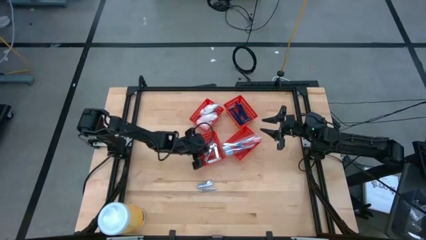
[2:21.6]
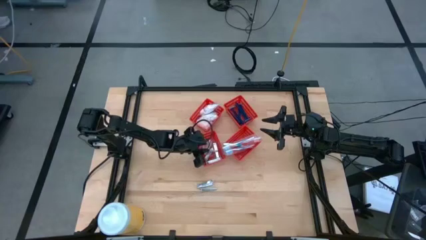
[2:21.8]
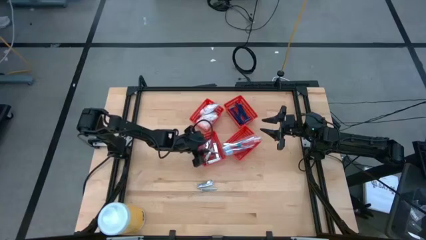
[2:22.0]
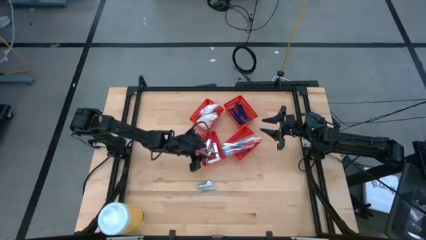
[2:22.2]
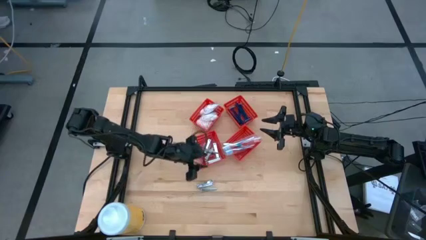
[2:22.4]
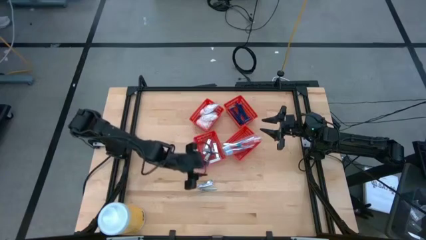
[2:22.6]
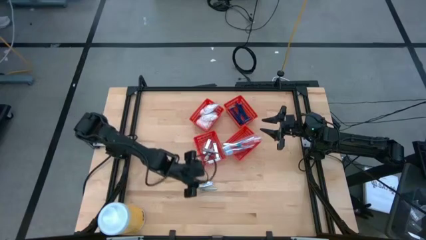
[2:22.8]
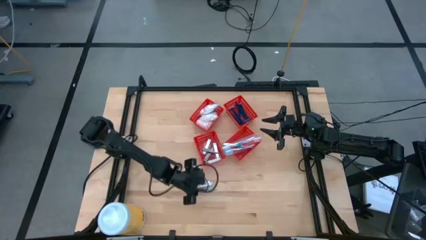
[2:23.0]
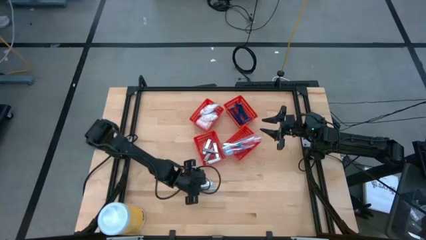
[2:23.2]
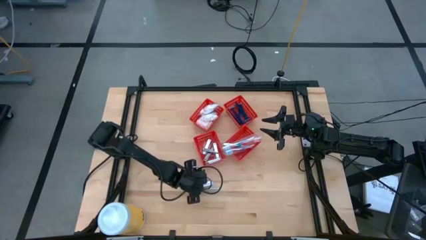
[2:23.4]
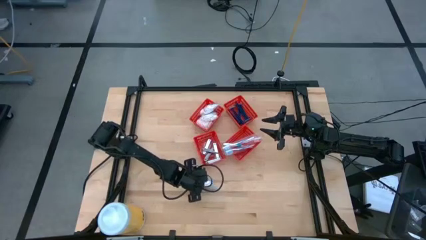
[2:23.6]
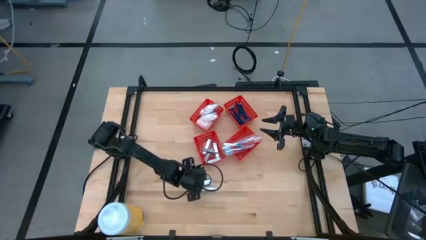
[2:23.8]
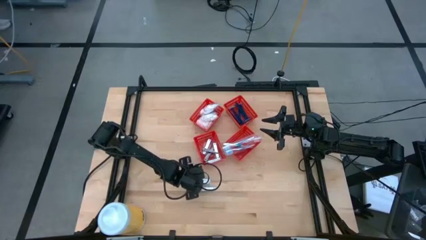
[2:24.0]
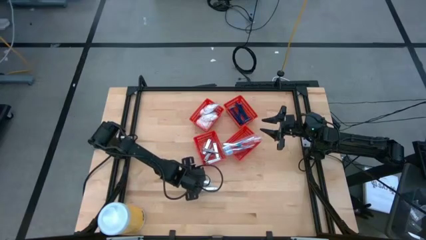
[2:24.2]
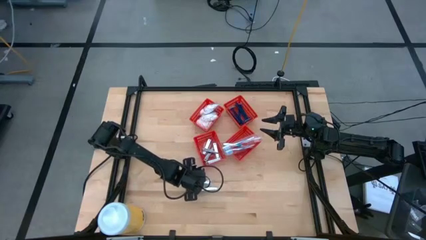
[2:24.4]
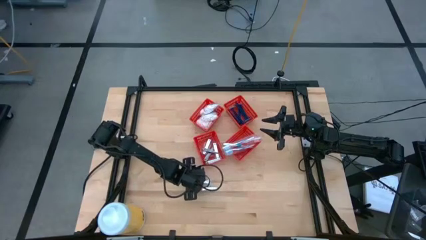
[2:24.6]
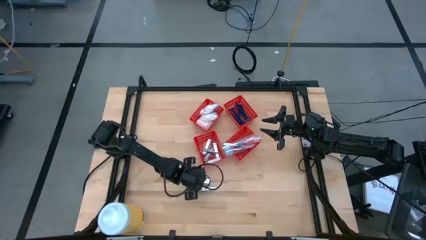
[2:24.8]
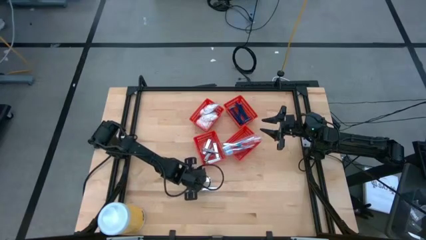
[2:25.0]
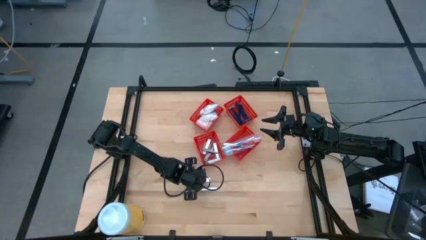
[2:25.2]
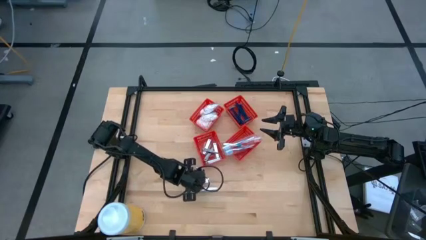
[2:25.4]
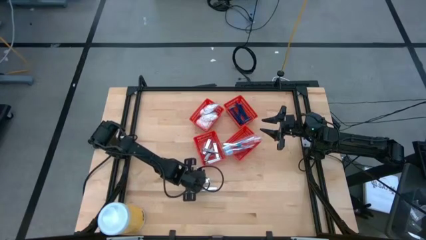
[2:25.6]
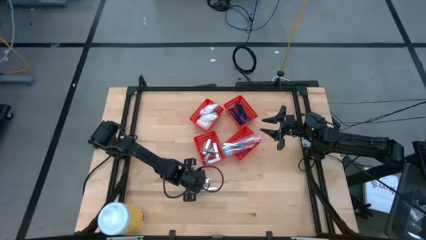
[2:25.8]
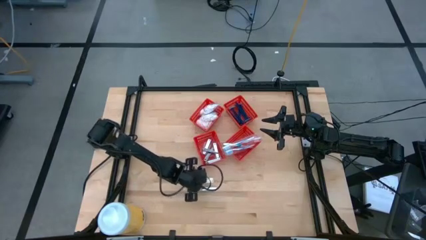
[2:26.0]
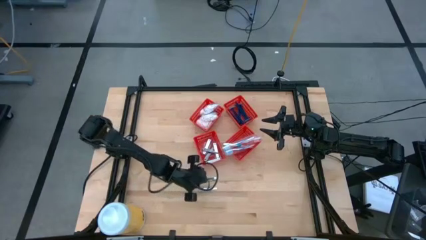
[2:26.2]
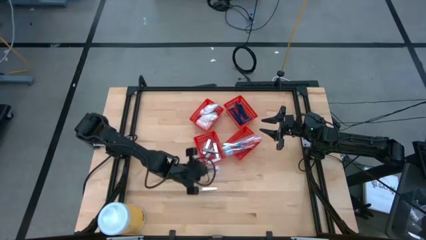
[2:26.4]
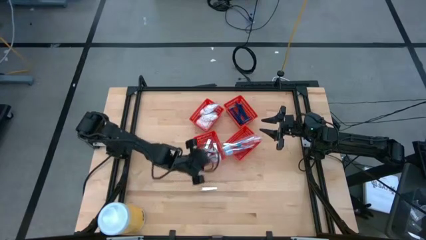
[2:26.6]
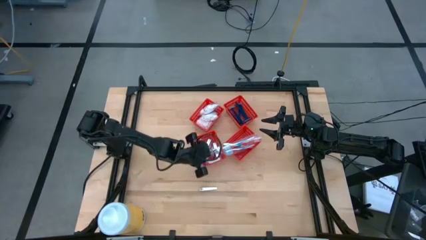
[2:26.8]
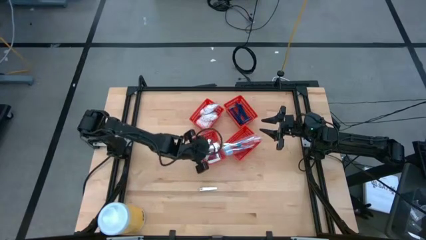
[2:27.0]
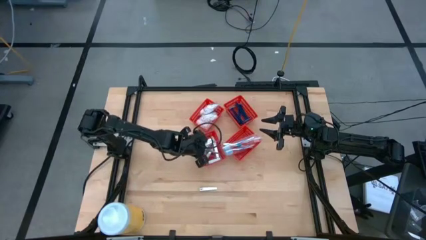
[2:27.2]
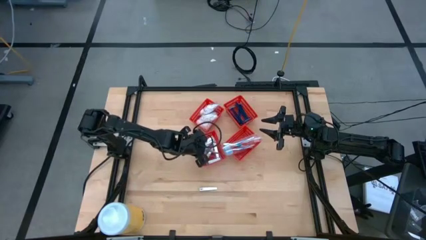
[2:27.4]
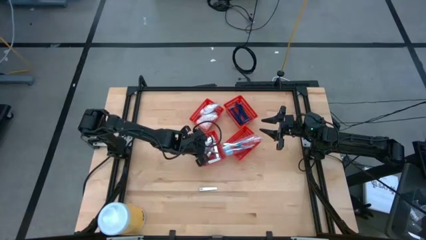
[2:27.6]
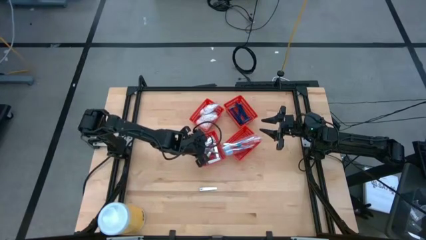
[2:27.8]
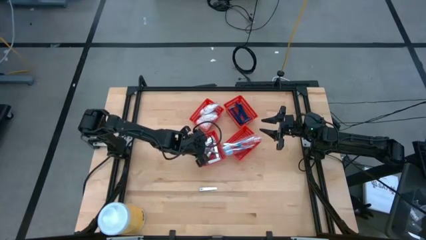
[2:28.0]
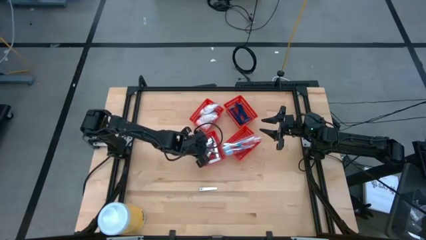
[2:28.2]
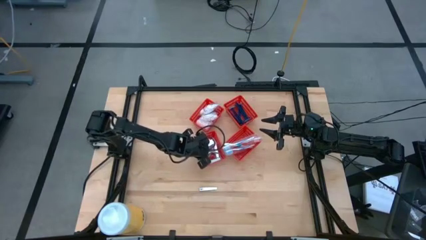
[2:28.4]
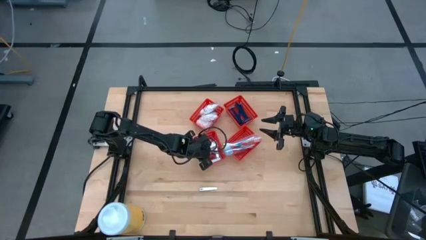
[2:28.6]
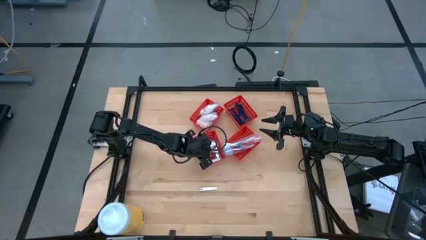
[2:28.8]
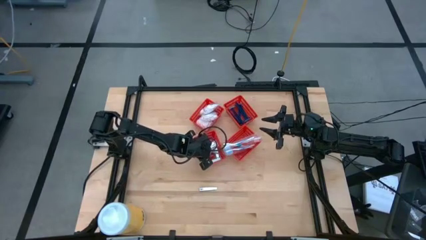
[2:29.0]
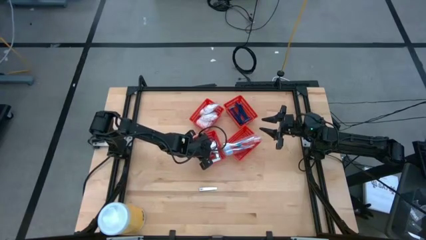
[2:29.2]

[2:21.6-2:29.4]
Task: Pick & Place Travel size toiletries
Put the silver nail cutter into the bottom left red bin

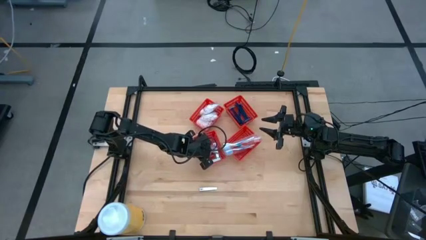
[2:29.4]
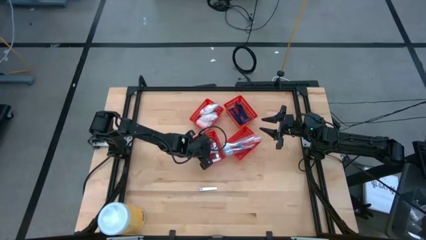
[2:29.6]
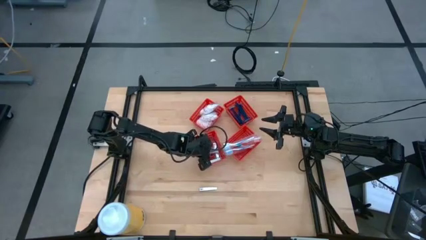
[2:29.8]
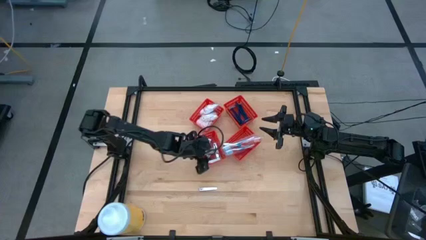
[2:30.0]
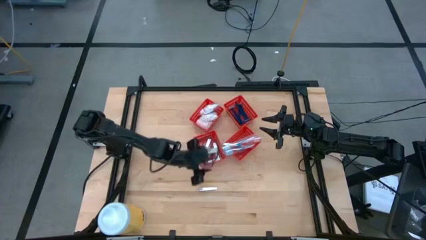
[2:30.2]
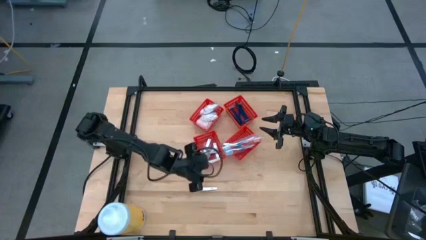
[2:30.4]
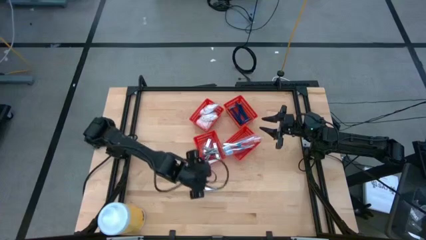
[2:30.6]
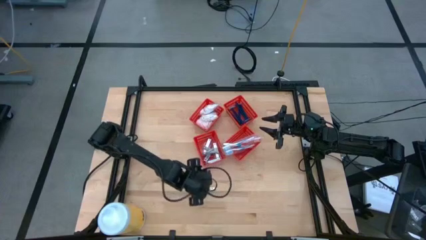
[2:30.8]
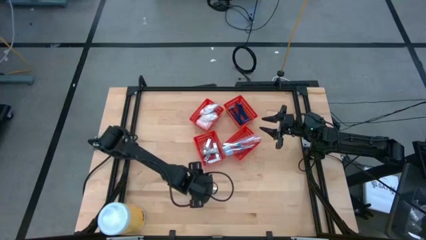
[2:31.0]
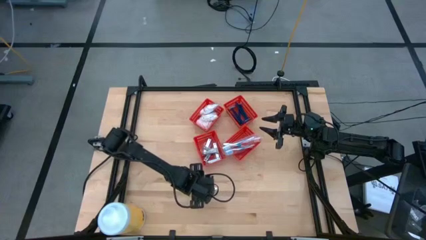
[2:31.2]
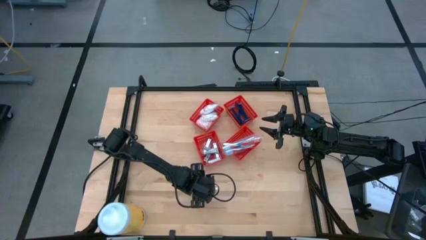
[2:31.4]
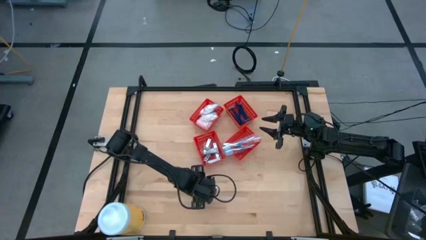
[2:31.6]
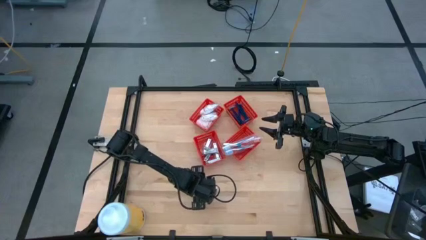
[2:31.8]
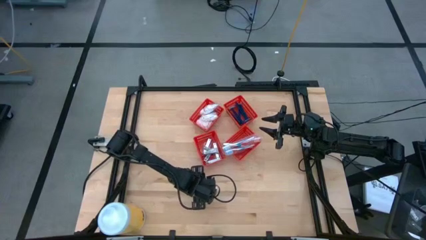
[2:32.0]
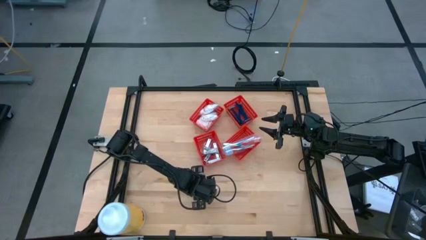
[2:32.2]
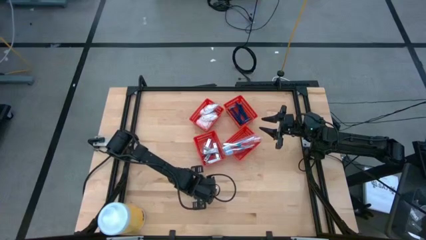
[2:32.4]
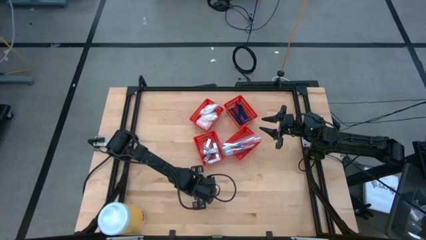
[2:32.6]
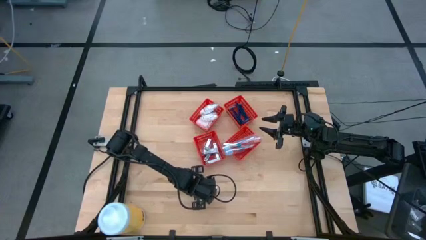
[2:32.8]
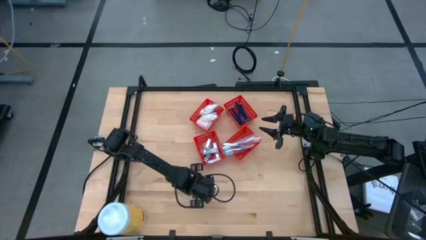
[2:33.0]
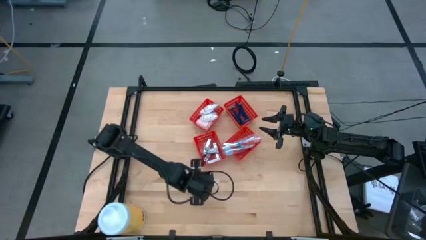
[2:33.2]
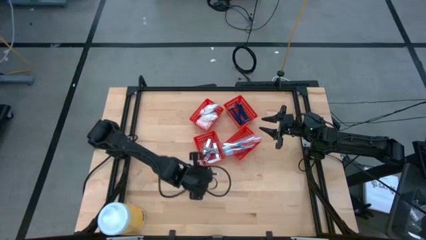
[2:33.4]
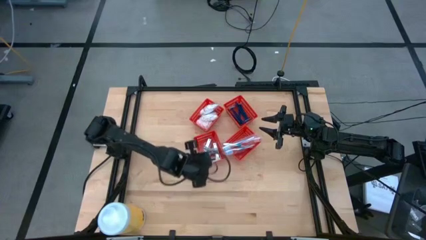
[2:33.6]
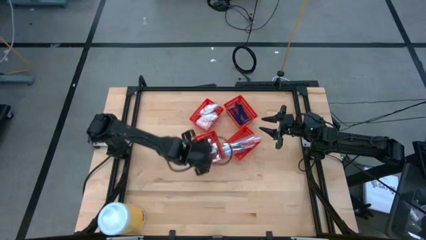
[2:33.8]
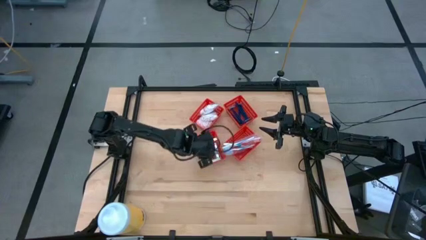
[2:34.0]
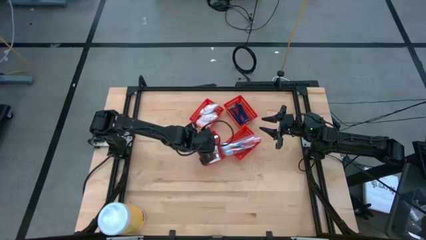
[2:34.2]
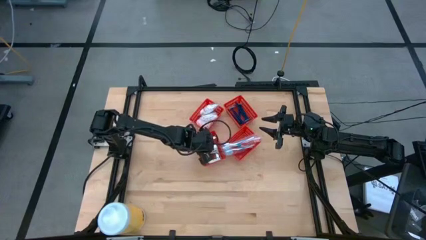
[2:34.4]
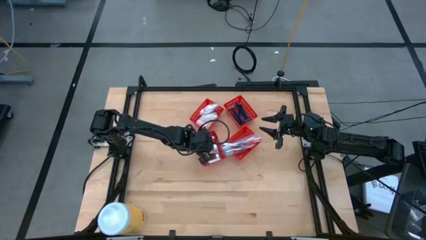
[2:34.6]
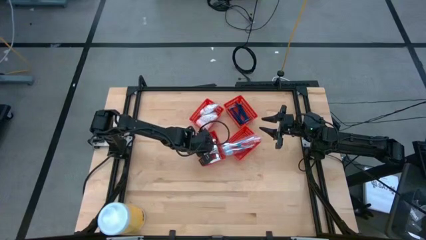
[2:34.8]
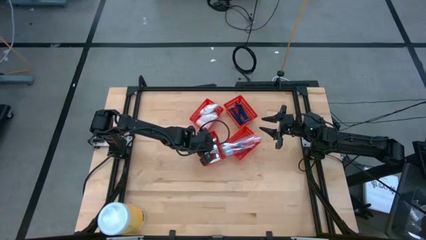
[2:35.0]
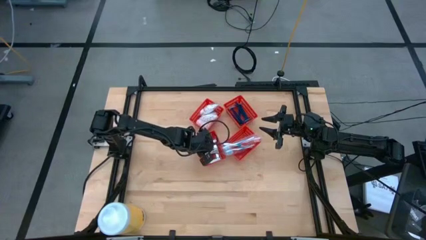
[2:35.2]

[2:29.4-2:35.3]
Put the silver nail cutter into the bottom left red bin

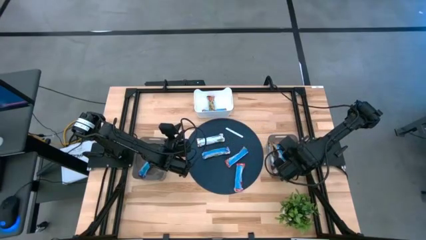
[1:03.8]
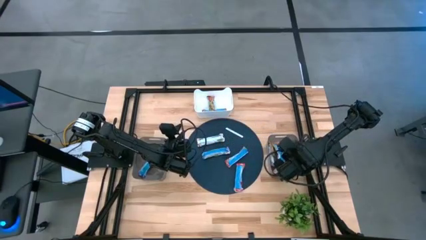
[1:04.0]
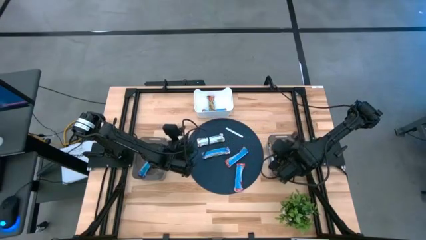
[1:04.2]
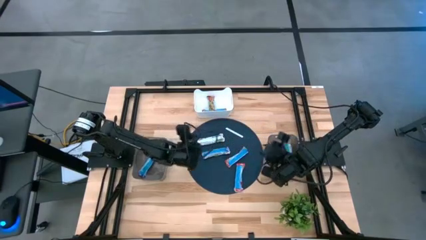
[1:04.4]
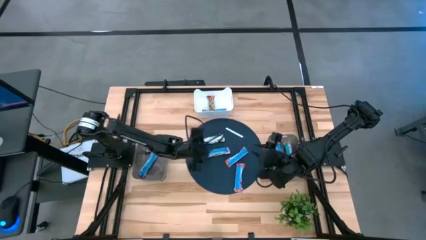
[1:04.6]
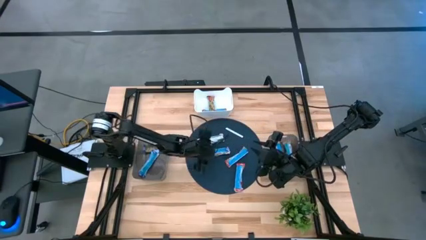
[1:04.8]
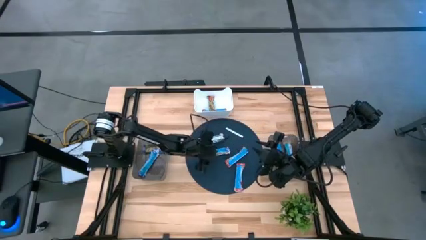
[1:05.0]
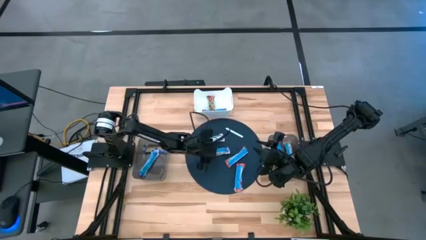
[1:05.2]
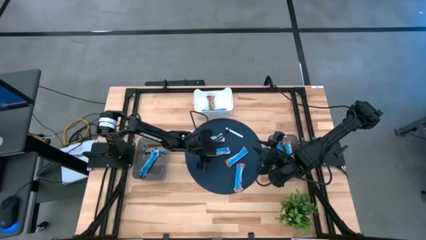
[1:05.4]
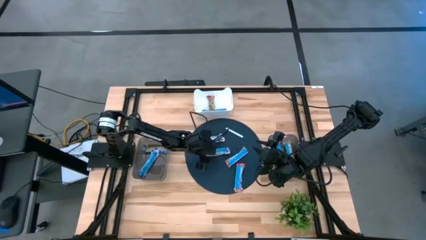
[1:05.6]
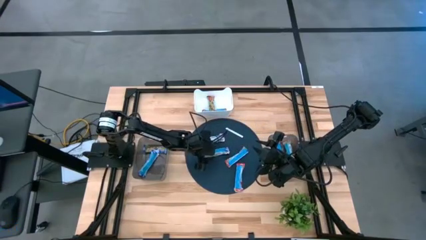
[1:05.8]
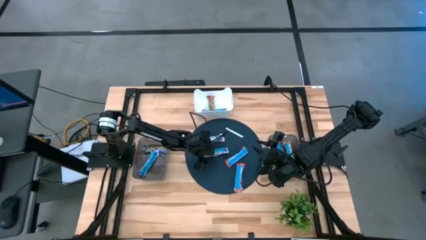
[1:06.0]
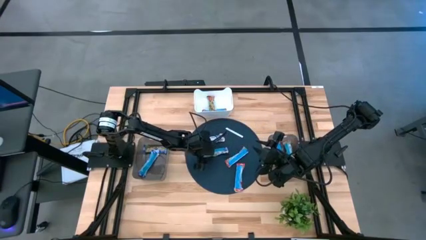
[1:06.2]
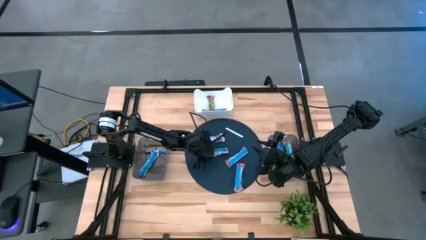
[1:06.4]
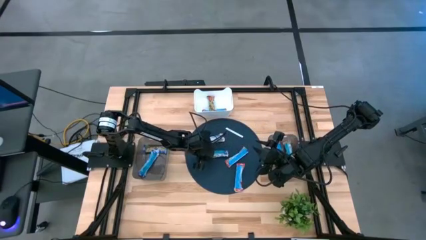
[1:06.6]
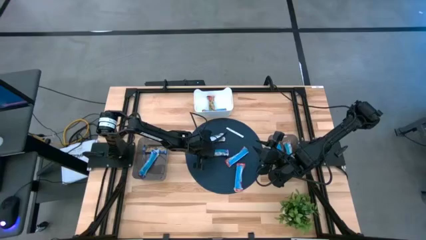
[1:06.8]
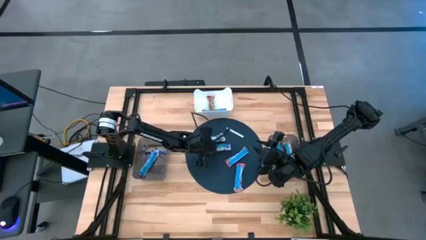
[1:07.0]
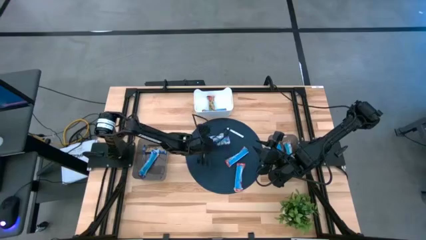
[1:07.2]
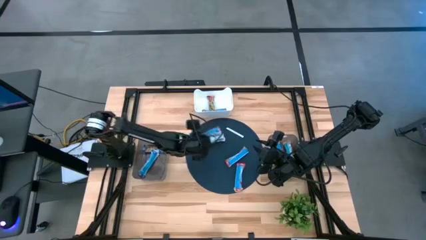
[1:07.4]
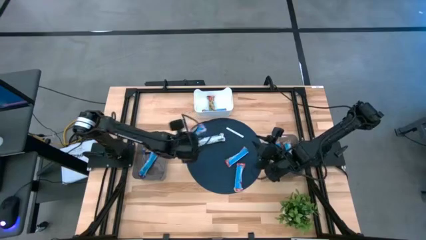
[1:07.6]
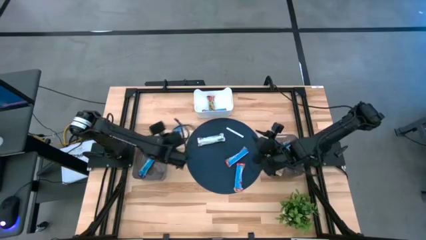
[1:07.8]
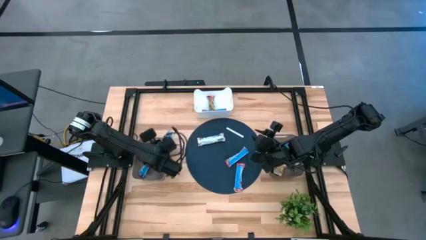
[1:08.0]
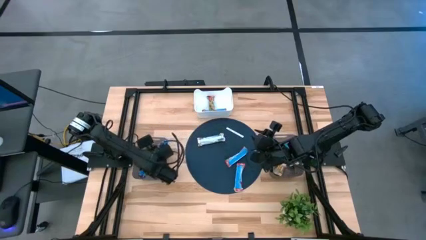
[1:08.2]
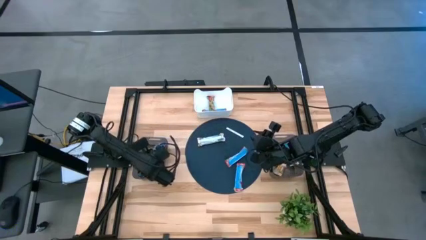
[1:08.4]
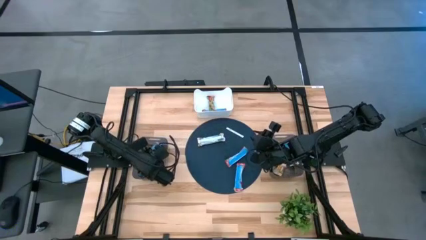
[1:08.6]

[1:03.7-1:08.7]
Task: Pick and place Granola Bars by type
Put the blue granola bar into the left black bin
